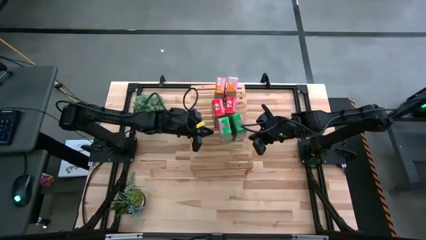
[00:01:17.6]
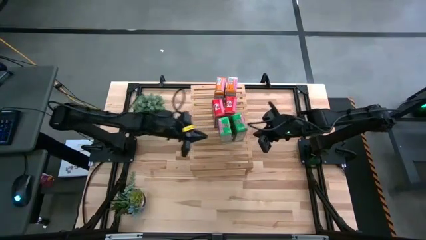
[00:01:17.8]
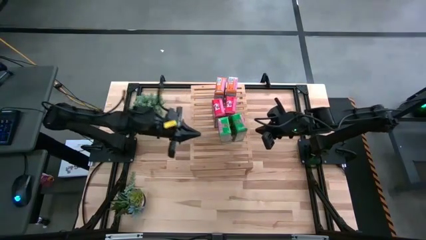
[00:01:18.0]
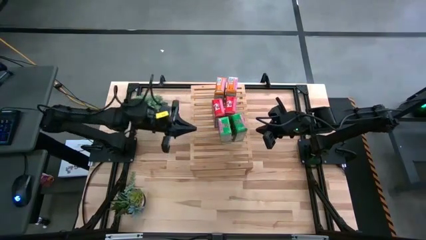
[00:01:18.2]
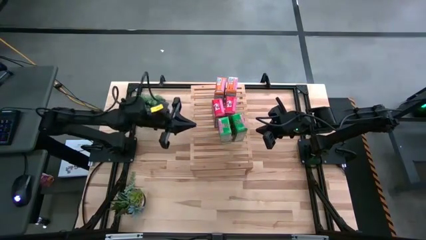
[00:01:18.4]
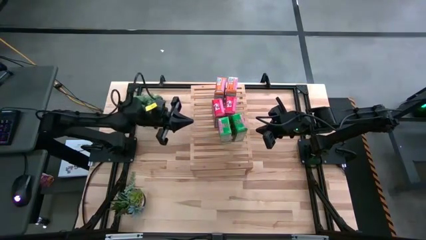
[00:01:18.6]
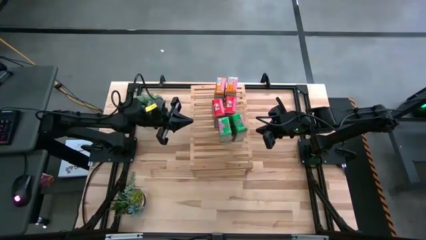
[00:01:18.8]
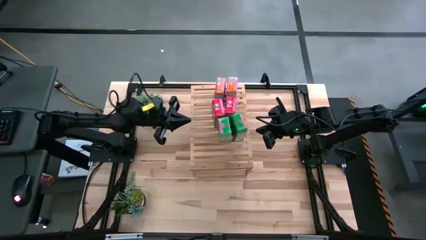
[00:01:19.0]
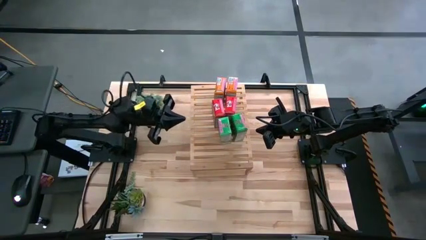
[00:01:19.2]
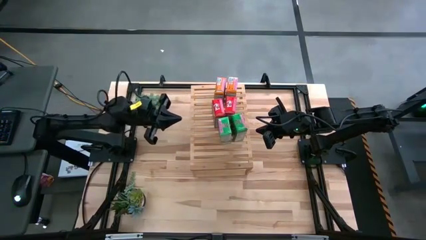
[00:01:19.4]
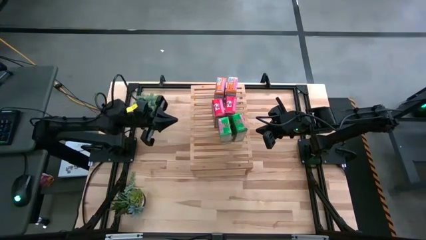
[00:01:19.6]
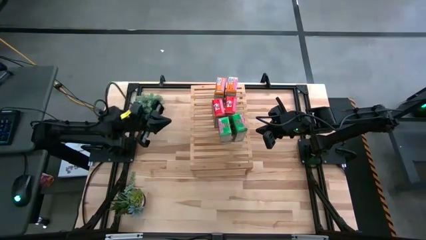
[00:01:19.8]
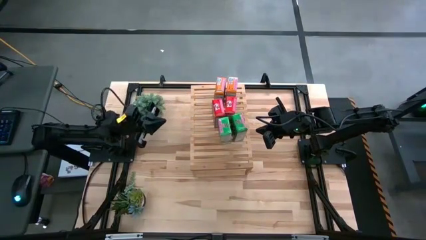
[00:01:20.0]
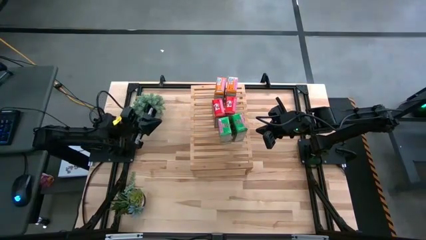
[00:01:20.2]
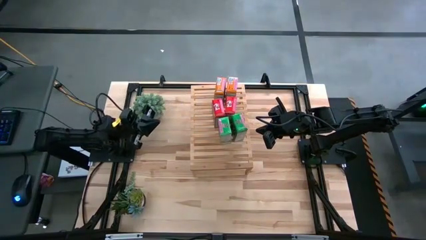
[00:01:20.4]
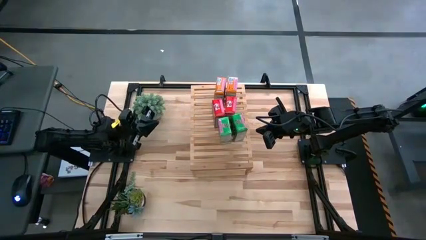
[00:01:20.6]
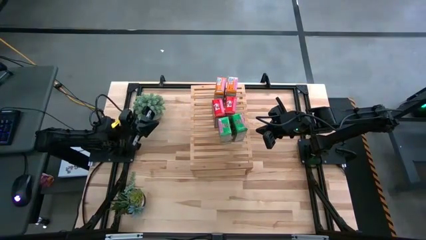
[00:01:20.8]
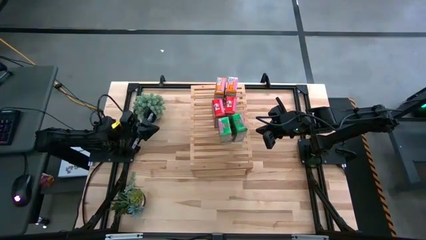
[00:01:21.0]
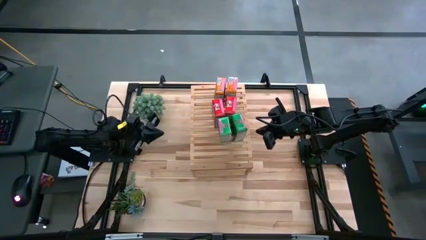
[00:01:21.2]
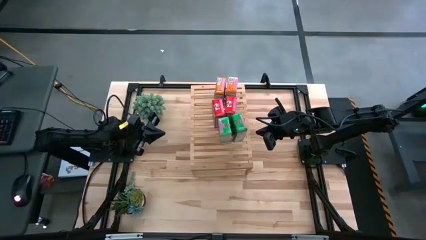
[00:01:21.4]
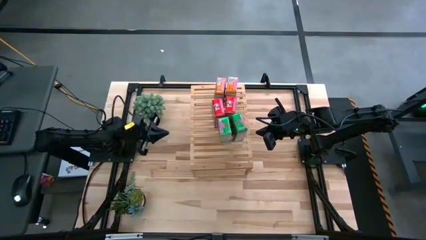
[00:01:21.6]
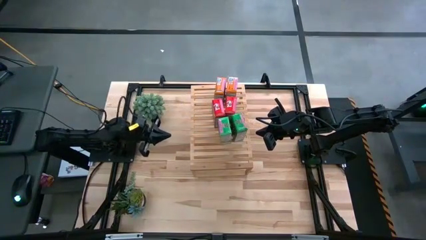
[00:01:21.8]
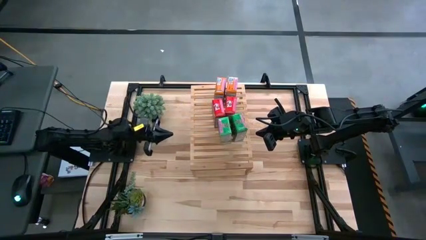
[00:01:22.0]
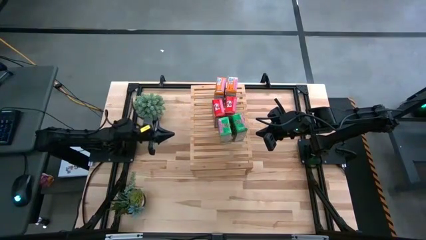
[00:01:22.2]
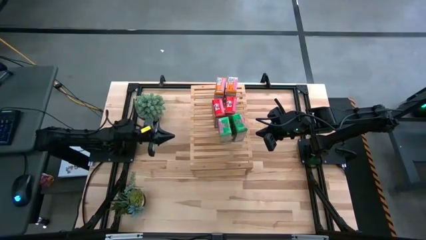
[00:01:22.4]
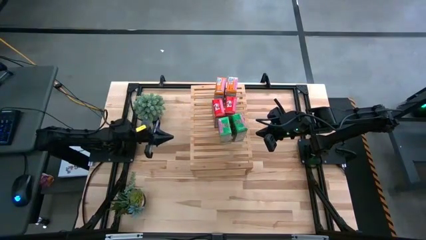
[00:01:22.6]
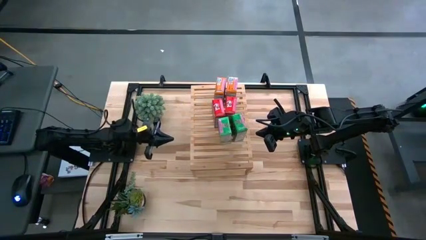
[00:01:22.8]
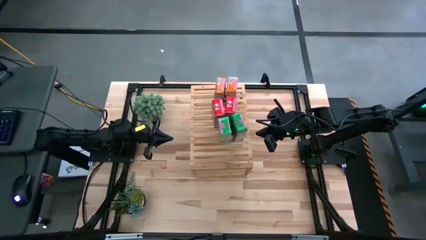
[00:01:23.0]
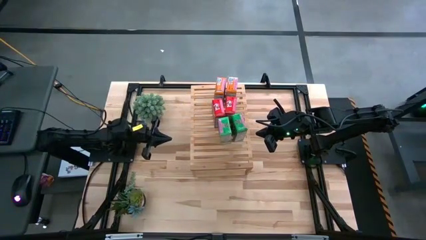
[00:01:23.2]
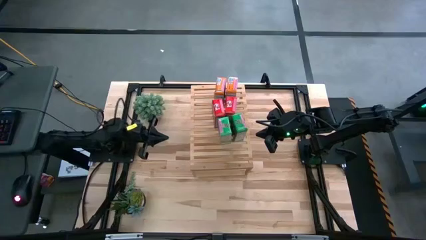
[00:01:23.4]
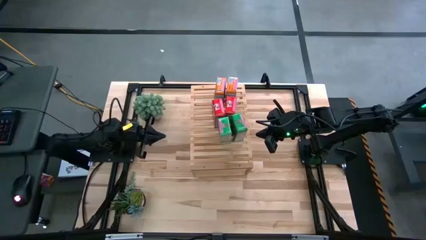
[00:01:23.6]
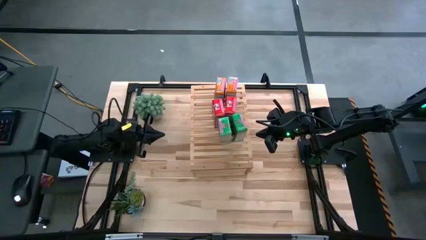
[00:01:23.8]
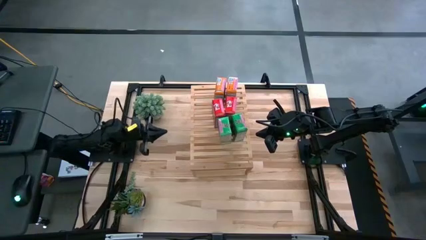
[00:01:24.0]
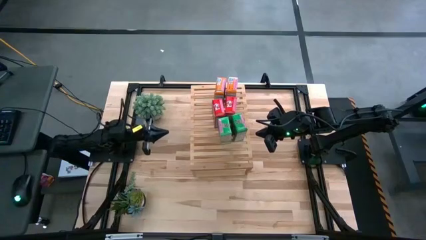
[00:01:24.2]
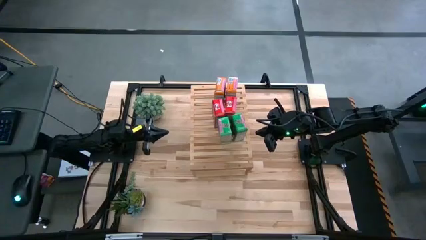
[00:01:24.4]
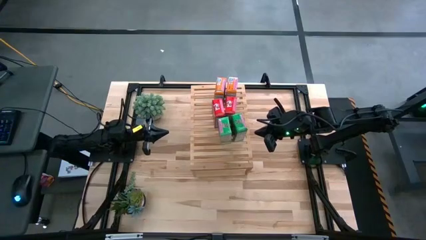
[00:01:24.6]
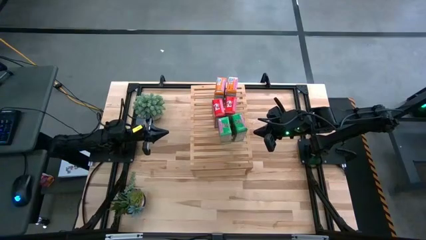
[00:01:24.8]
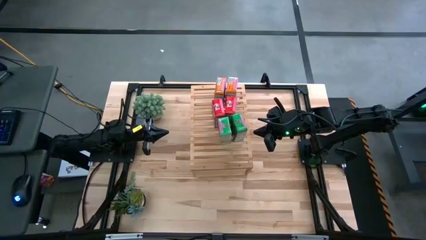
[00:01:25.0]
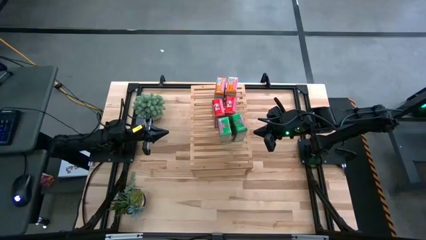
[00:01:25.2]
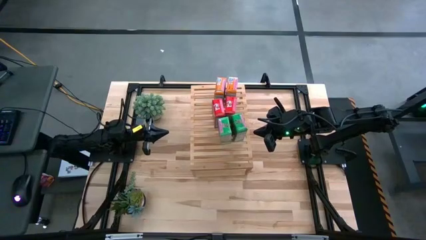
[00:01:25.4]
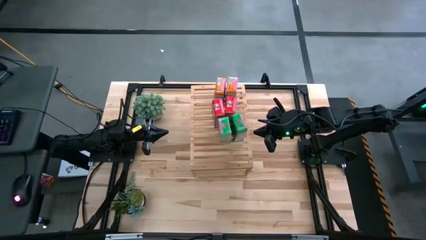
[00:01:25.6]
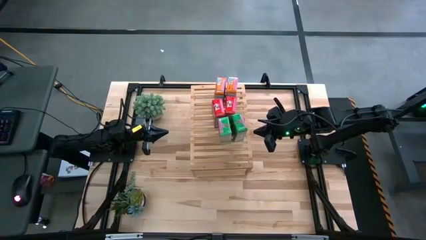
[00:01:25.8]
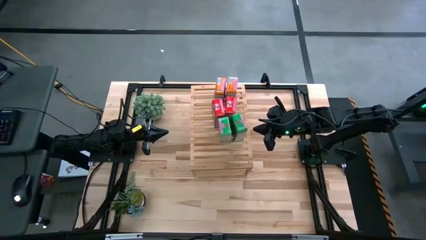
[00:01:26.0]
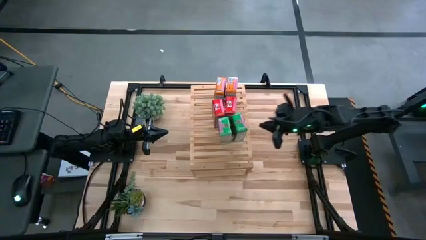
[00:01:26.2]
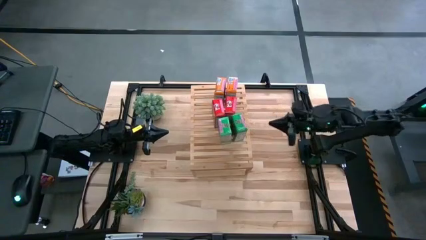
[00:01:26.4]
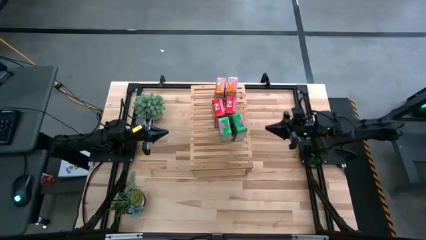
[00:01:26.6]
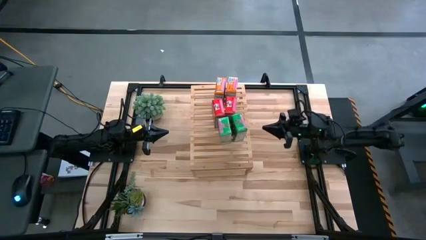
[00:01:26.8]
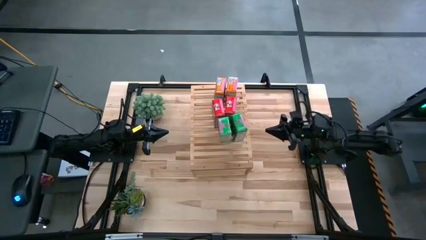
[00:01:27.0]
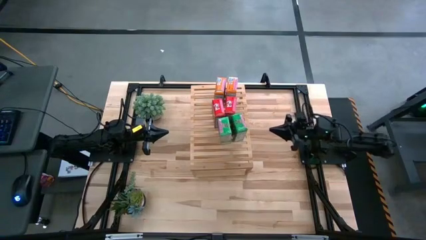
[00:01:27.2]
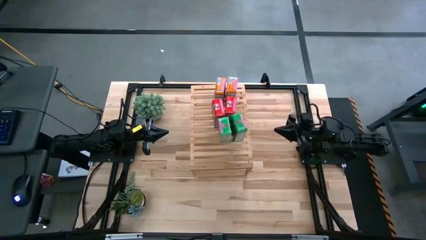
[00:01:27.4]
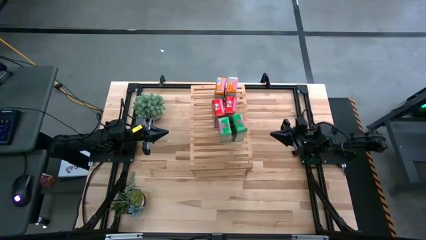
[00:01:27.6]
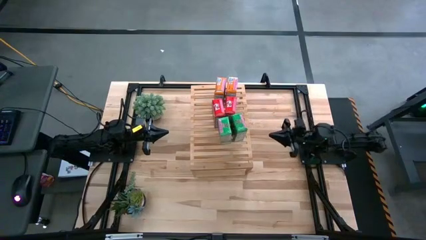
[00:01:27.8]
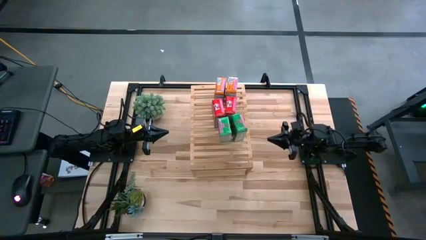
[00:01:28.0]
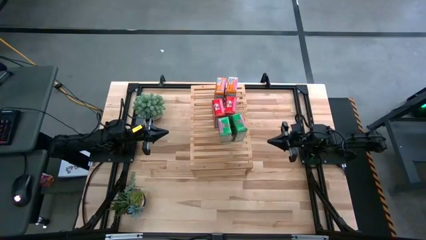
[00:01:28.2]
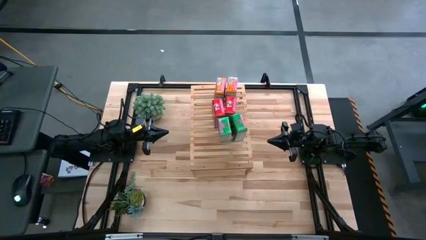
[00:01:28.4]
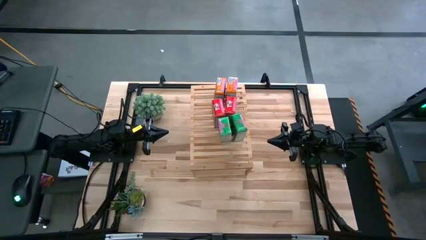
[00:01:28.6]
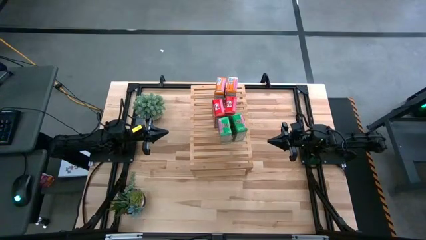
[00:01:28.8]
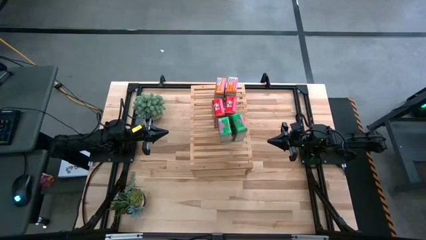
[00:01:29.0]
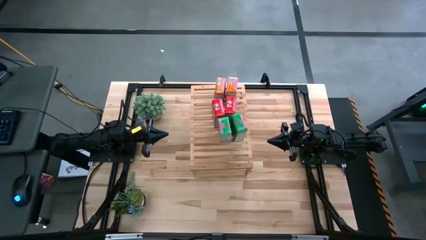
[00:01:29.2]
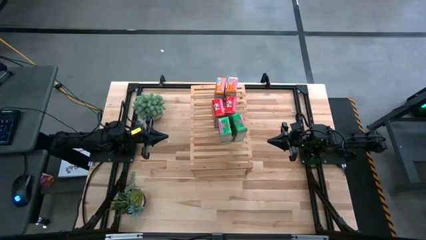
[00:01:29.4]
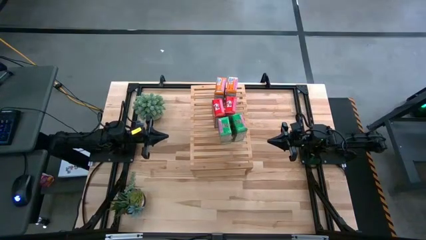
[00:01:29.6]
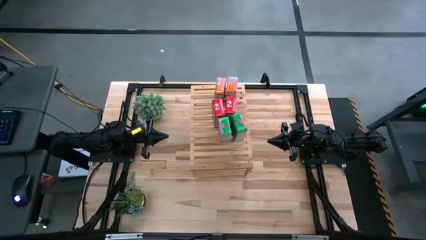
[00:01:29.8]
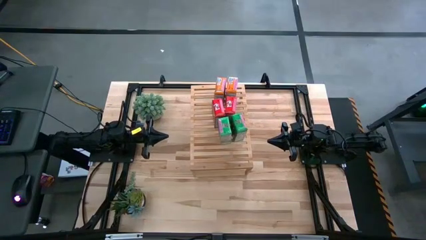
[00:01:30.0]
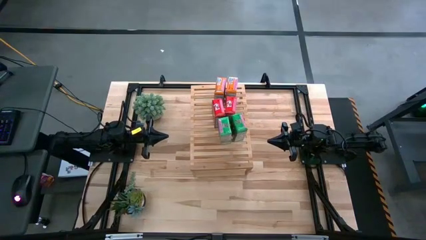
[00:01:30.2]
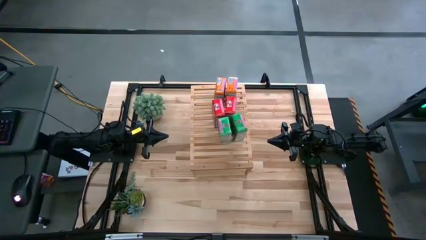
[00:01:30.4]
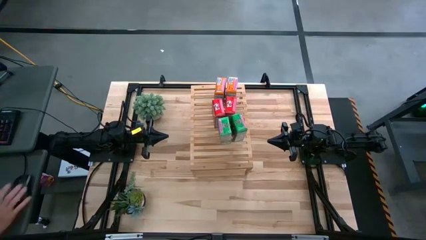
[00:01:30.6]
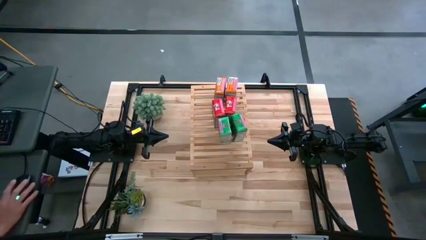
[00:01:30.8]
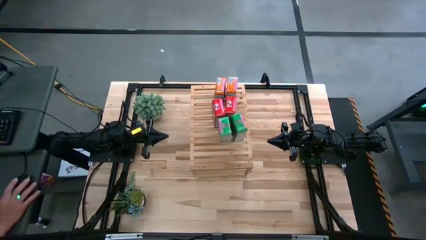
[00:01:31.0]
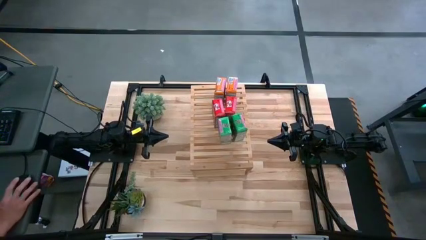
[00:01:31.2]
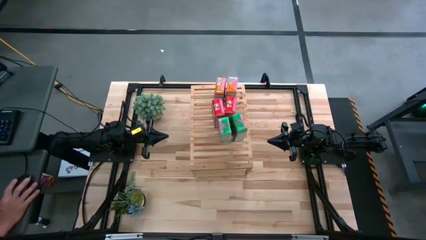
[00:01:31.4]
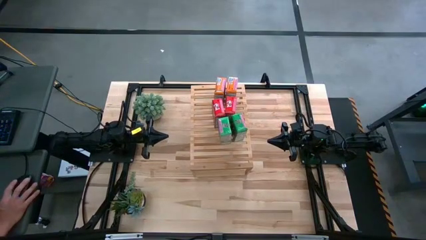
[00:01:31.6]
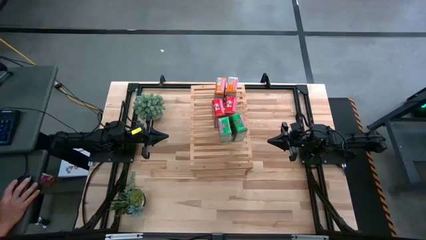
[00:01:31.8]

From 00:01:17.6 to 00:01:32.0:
Task: Stack cereal on shelf
Return to Home Position
